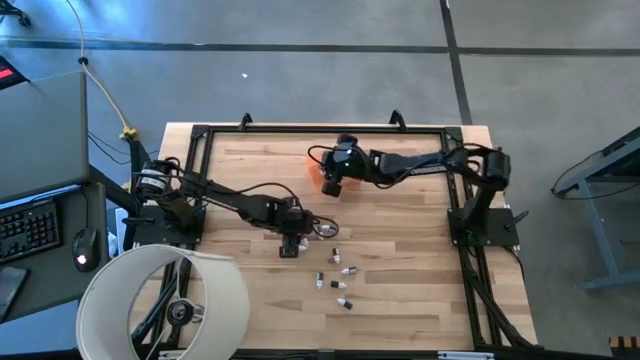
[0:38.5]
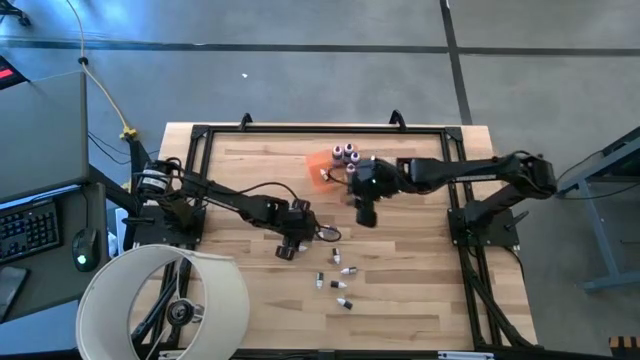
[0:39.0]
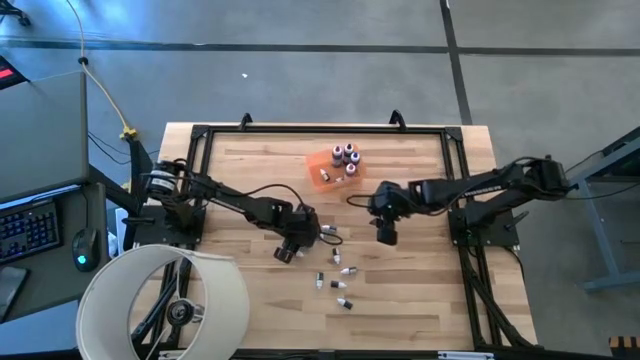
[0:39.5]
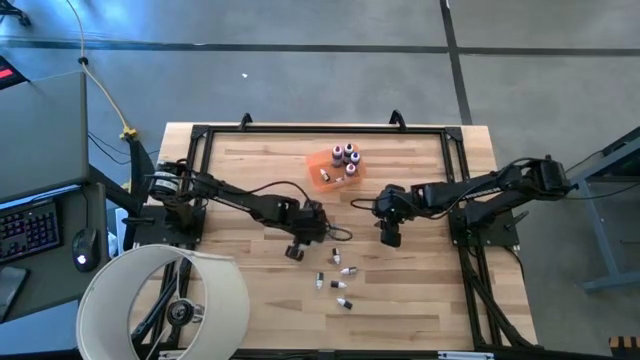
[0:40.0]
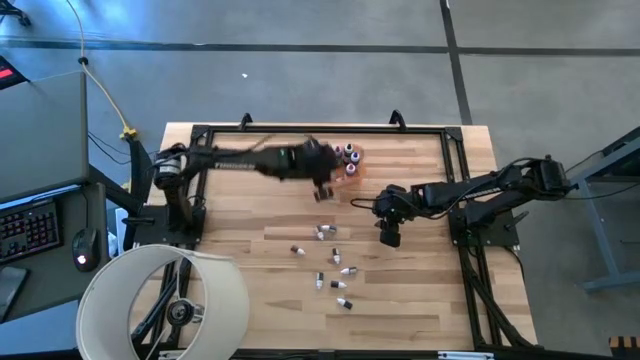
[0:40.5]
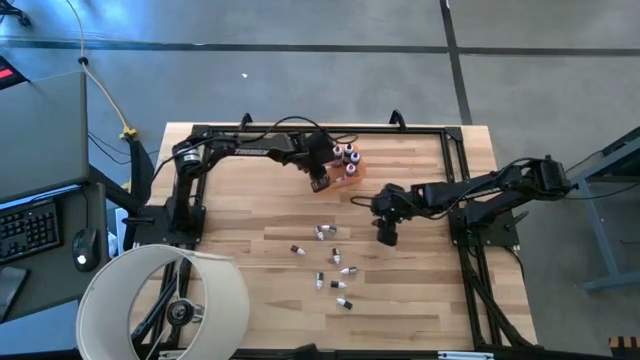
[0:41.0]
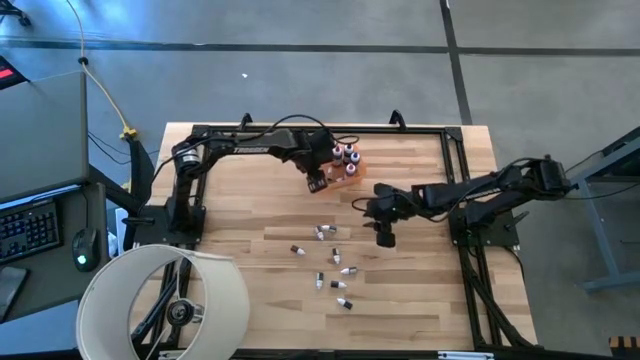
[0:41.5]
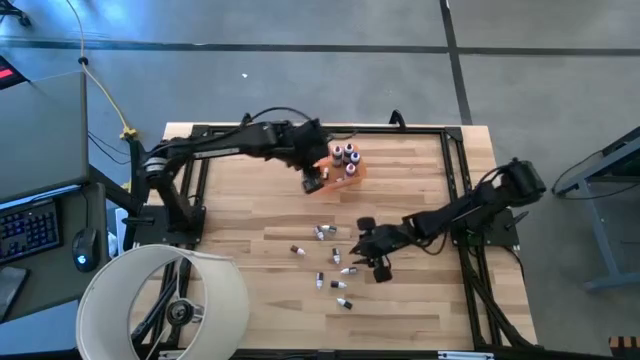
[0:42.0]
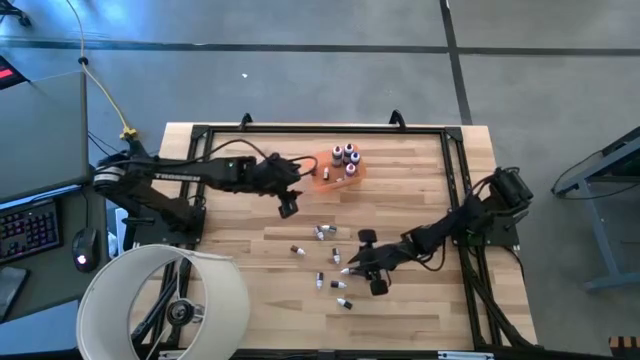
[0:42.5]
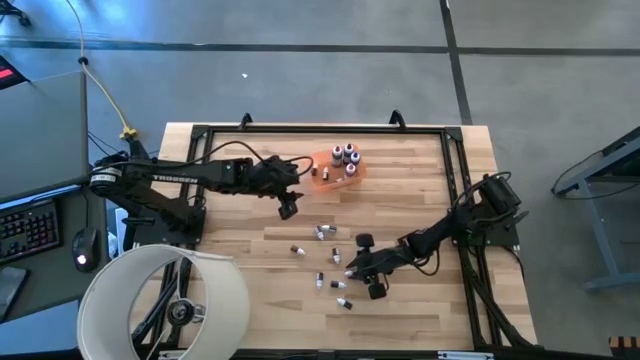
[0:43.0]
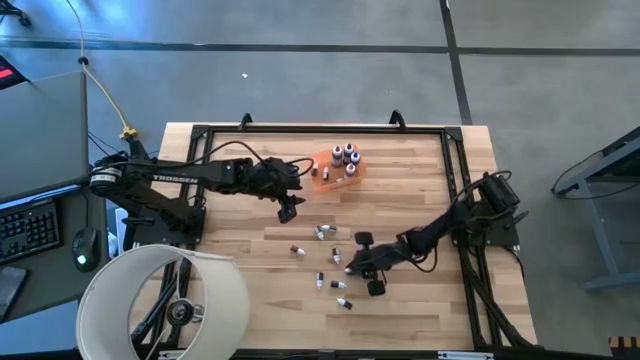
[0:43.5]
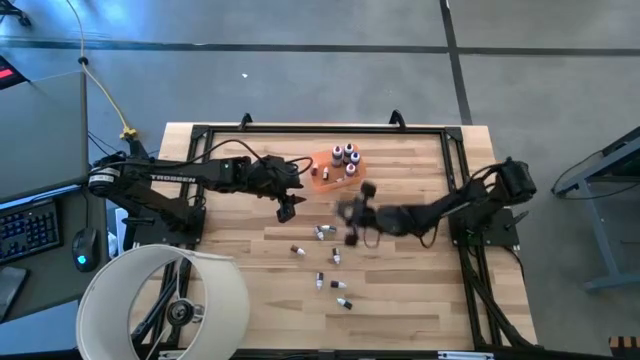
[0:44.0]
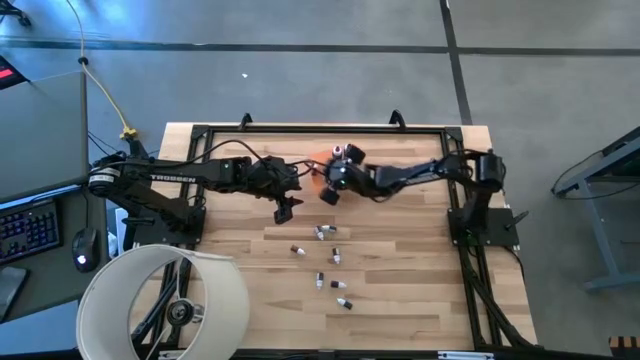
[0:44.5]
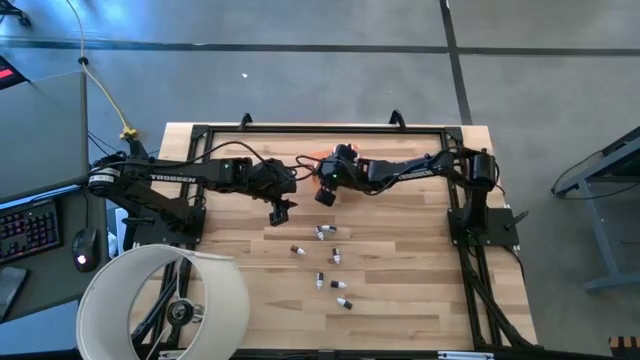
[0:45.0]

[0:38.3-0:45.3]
Task: Pick & Place food coloring
Put the small red food coloring bottle into the orange bin

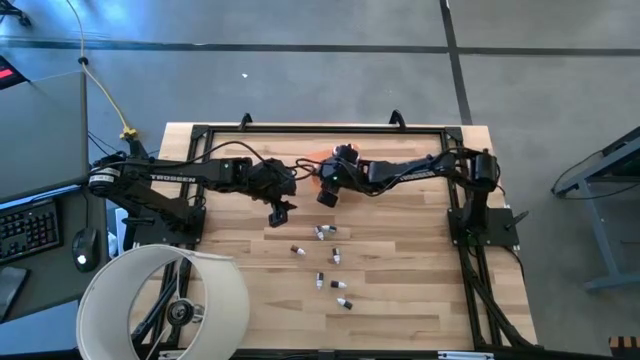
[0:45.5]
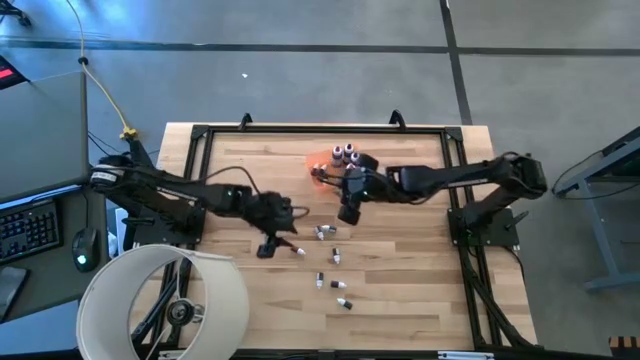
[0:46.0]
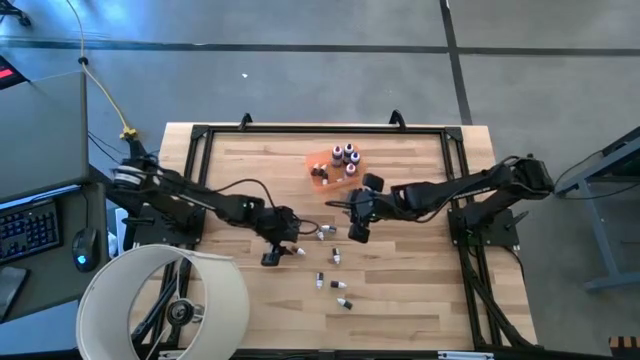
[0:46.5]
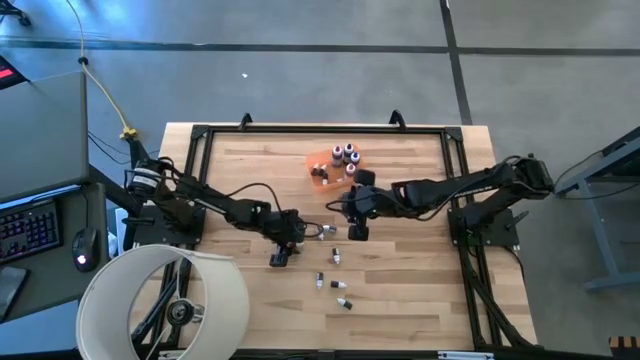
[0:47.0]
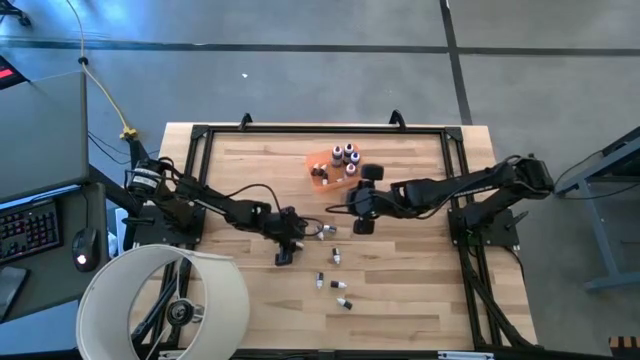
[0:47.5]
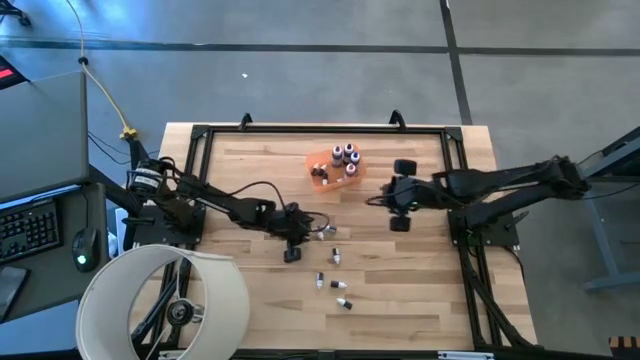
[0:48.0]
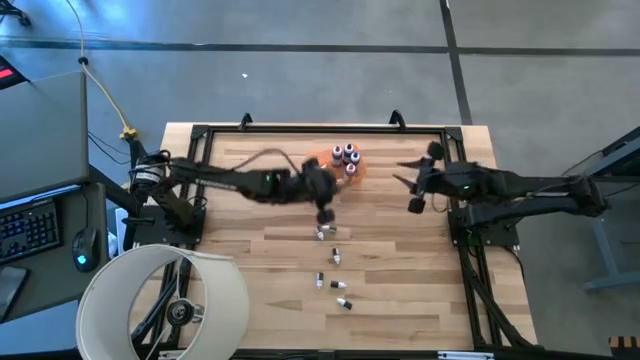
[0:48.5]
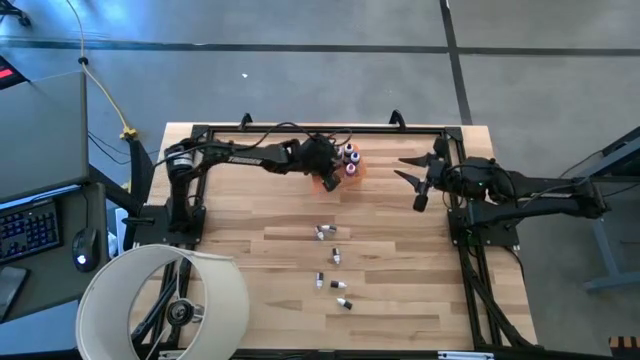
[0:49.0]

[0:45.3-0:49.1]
Put the small red food coloring bottle into the orange bin

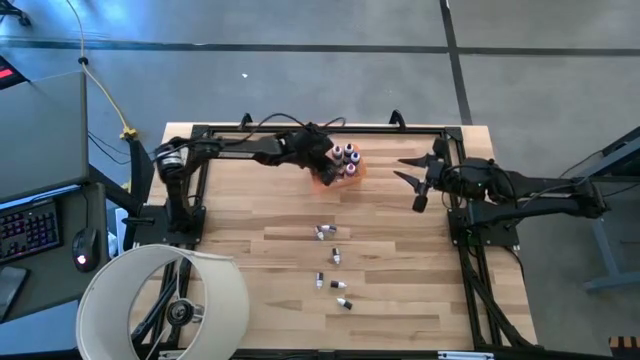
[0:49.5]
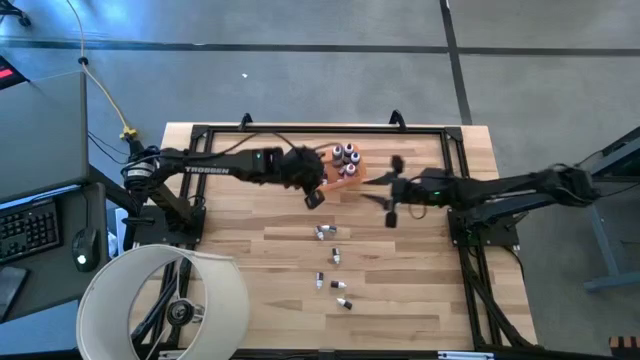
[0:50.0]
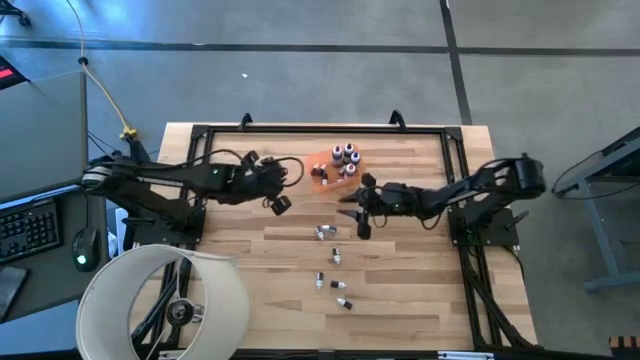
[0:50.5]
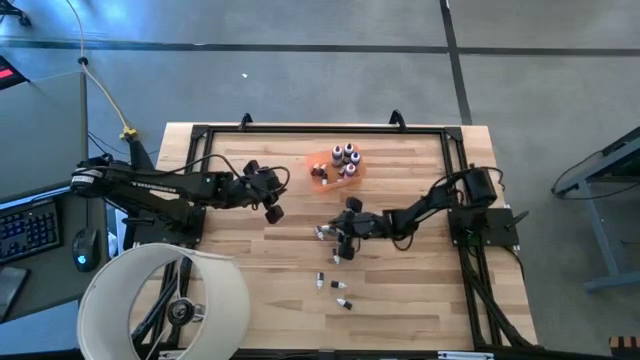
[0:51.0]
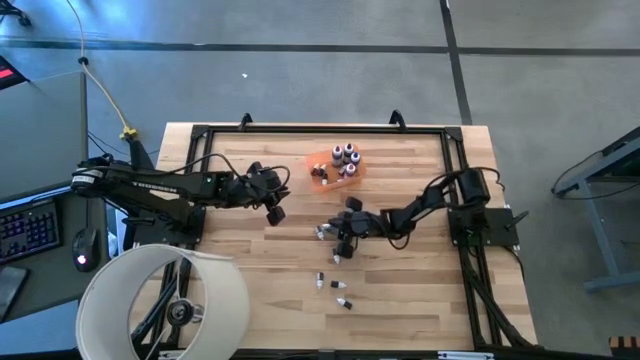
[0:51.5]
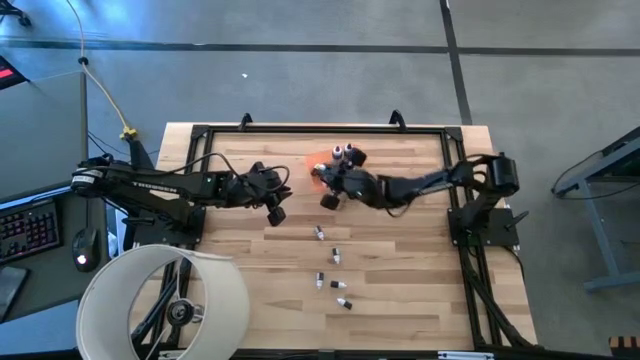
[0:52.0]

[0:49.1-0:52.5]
Put the small blue food coloring bottle into the orange bin

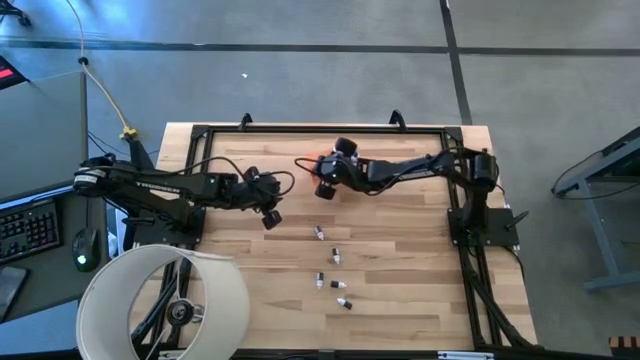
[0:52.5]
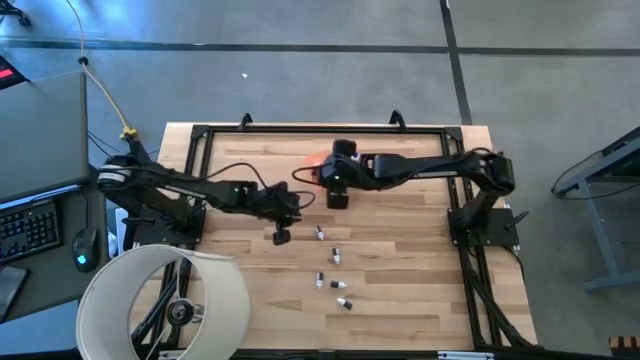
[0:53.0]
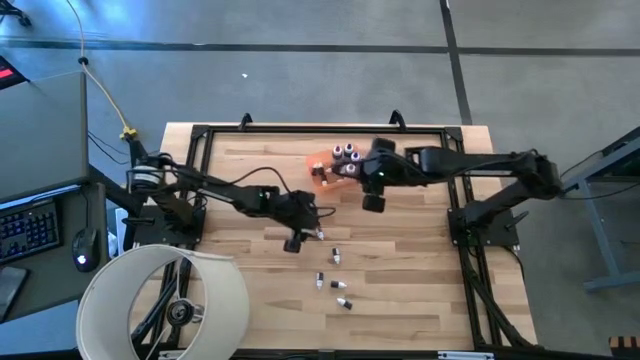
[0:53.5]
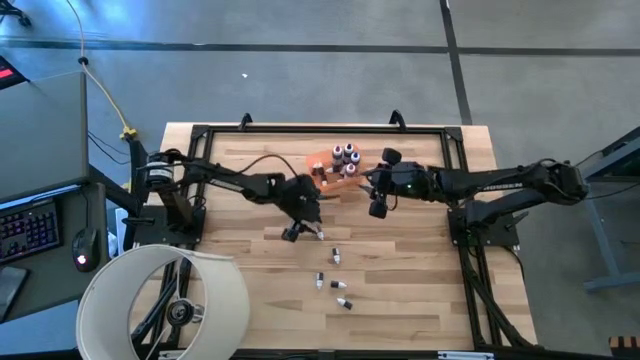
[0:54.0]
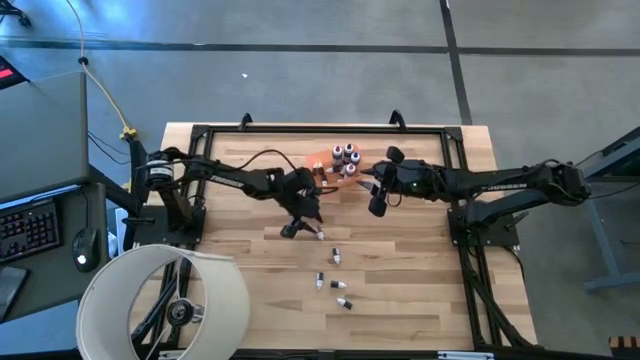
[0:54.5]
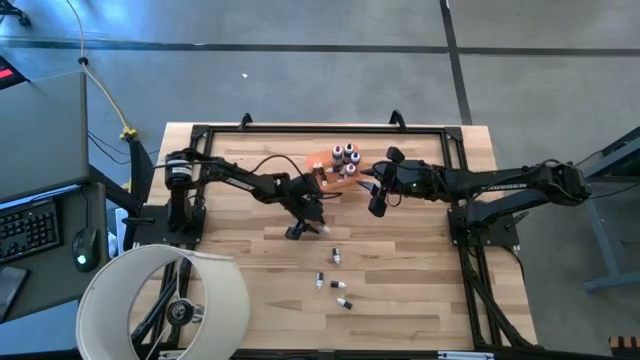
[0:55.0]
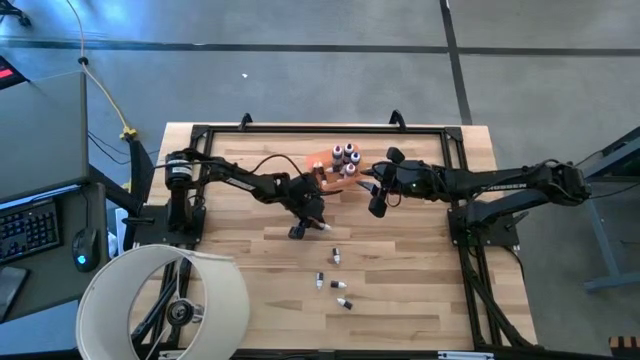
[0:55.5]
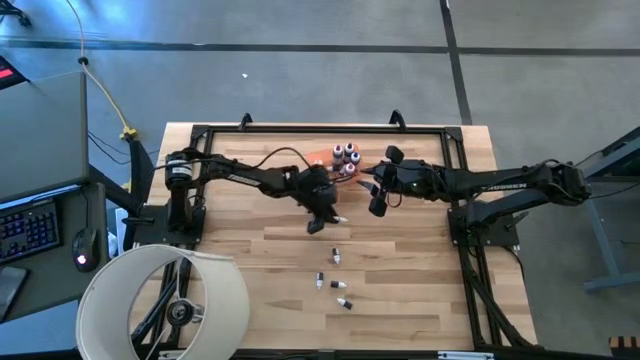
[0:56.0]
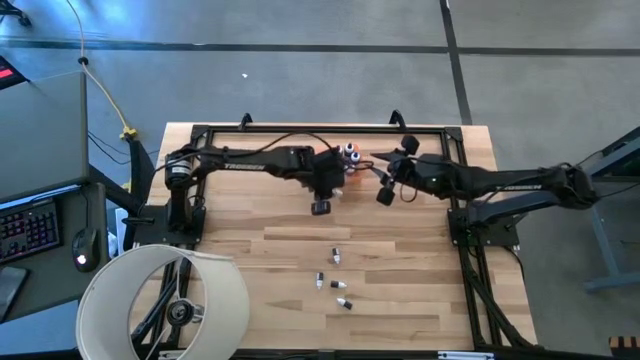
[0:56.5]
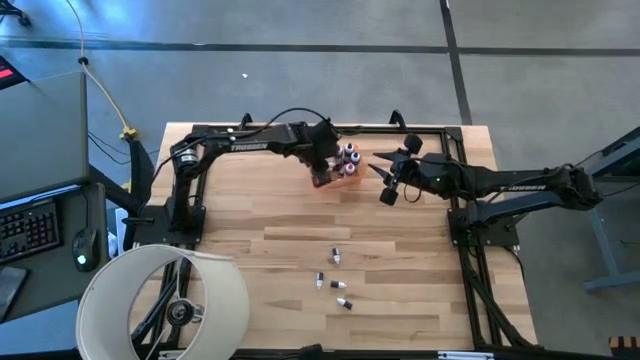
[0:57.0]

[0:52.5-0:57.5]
Put the small brown food coloring bottle into the orange bin

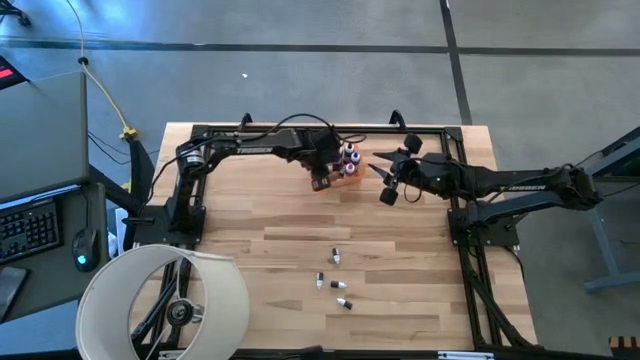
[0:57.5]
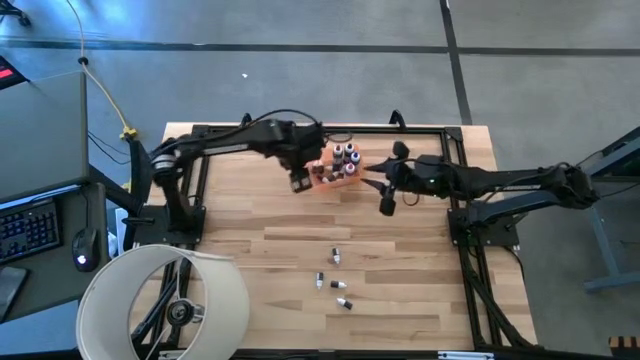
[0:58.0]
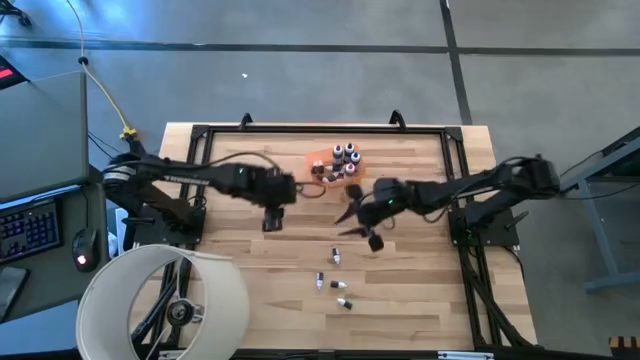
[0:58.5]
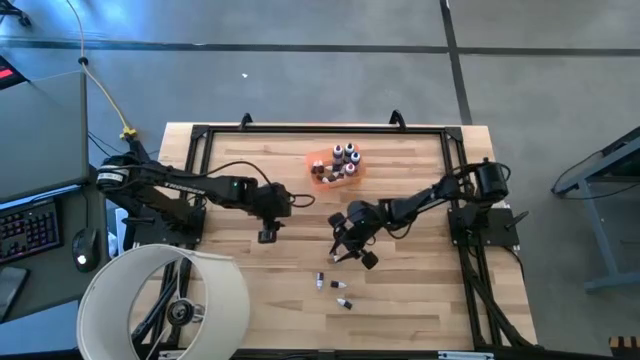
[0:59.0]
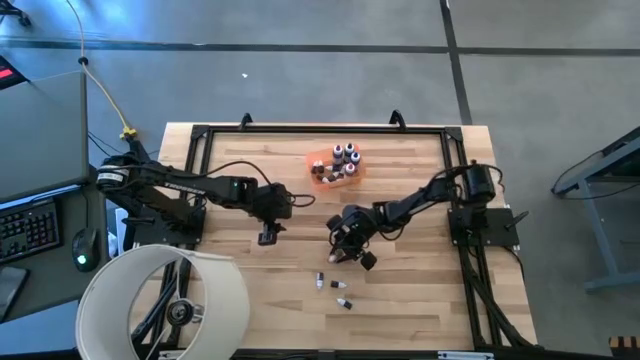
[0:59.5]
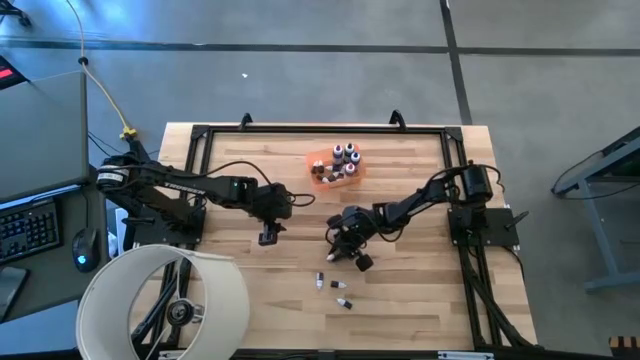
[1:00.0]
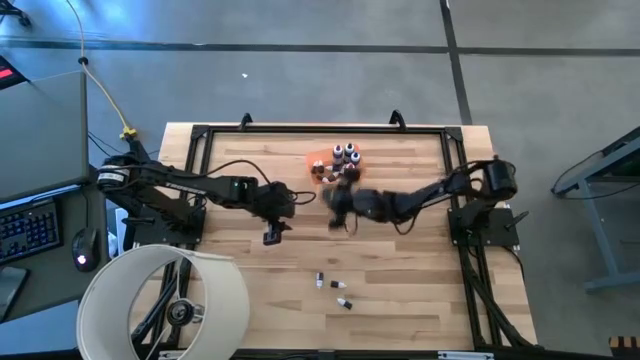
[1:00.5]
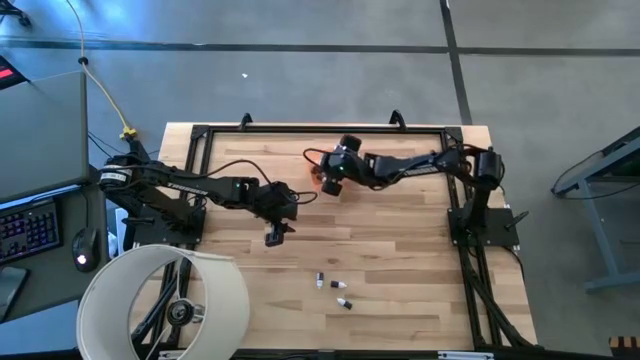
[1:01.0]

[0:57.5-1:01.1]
Put the small green food coloring bottle into the orange bin
